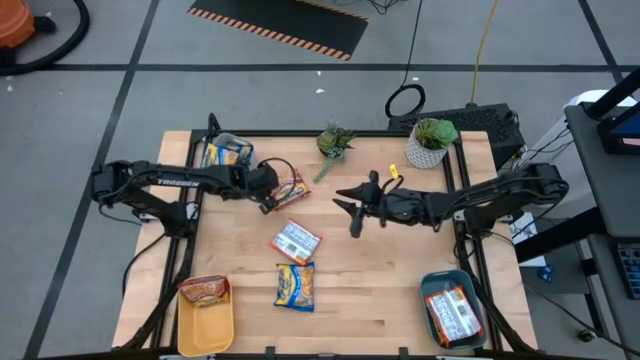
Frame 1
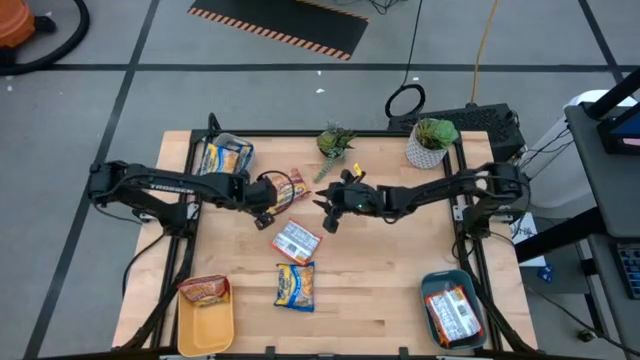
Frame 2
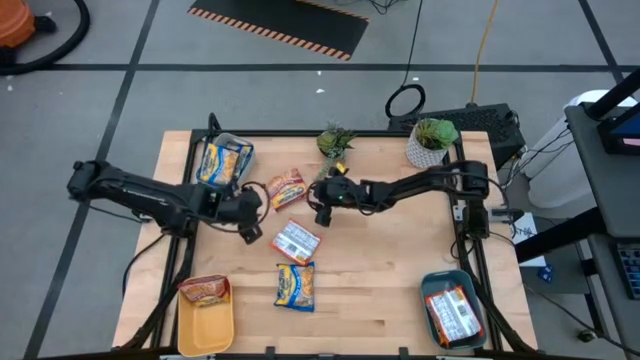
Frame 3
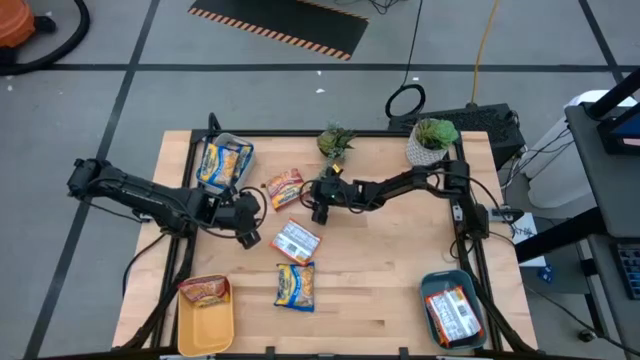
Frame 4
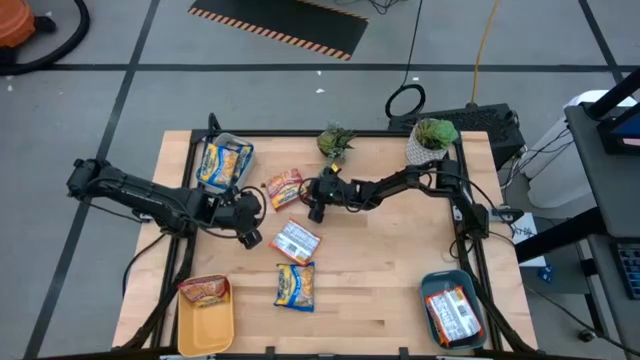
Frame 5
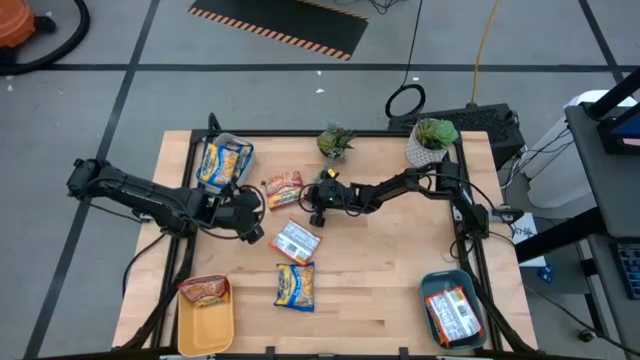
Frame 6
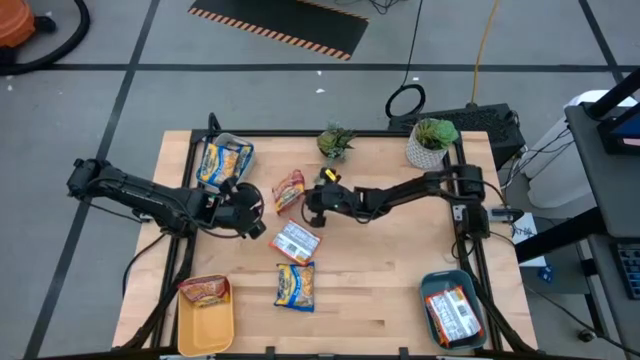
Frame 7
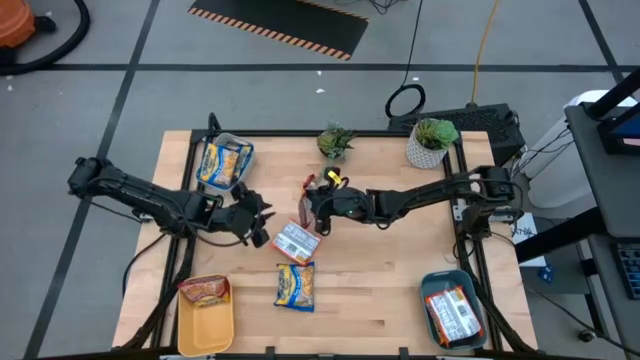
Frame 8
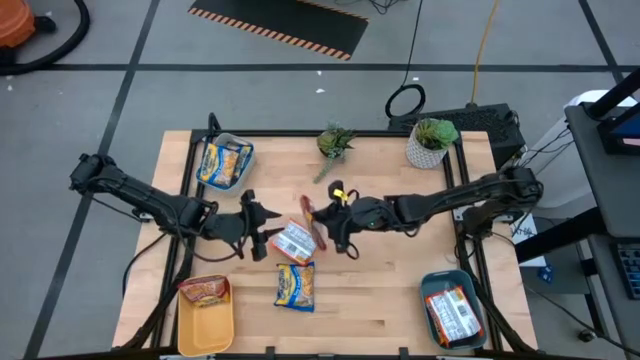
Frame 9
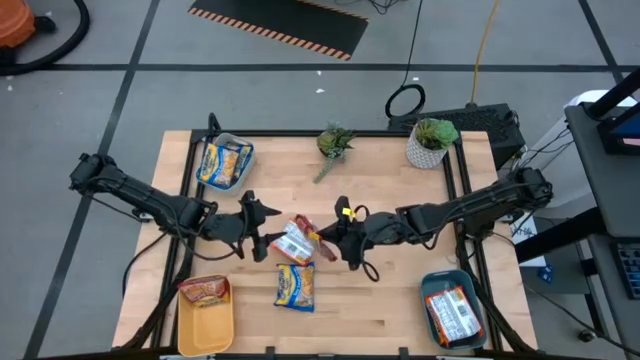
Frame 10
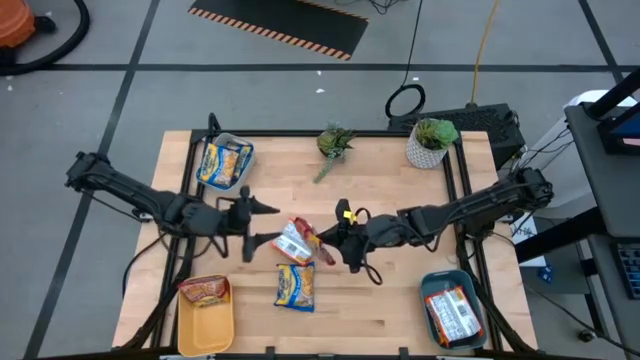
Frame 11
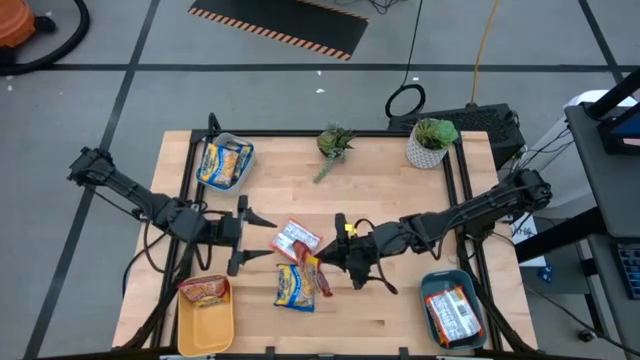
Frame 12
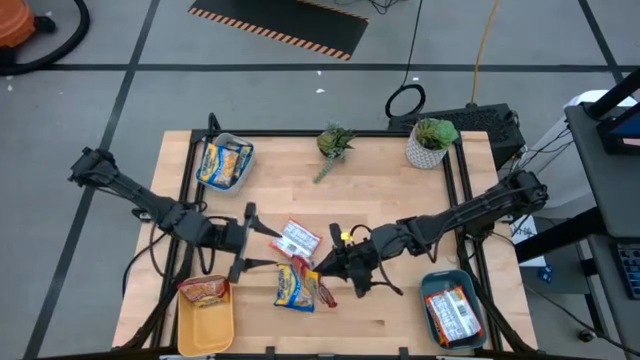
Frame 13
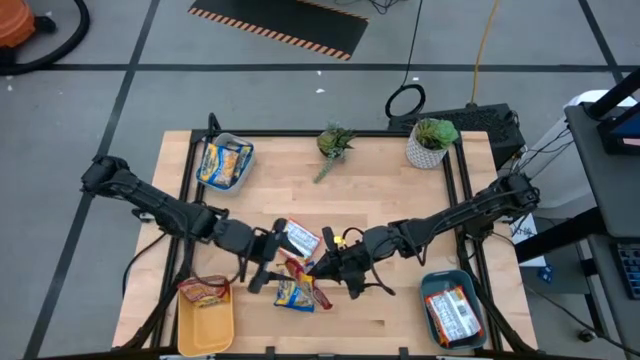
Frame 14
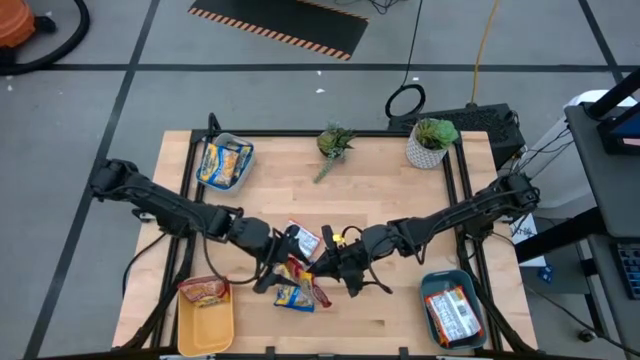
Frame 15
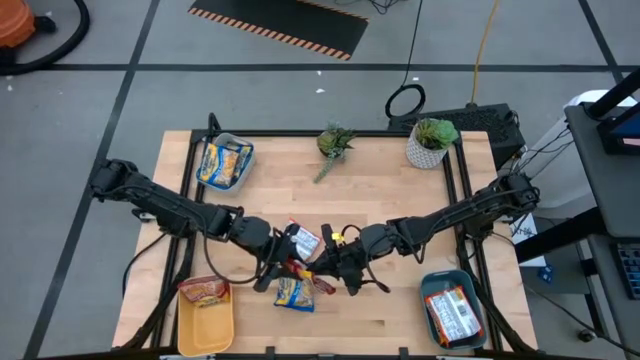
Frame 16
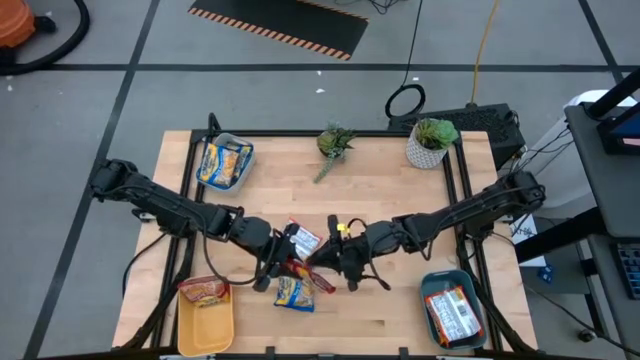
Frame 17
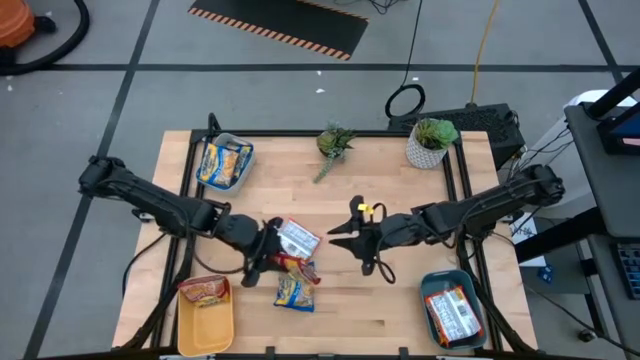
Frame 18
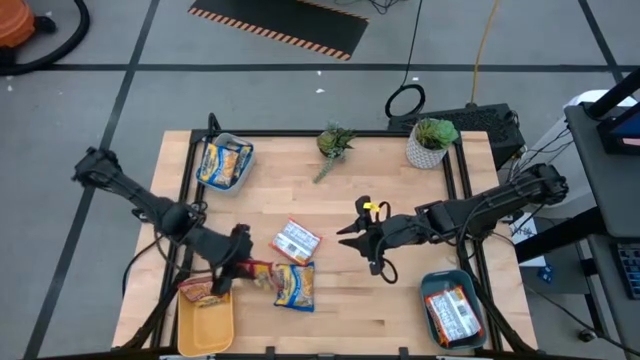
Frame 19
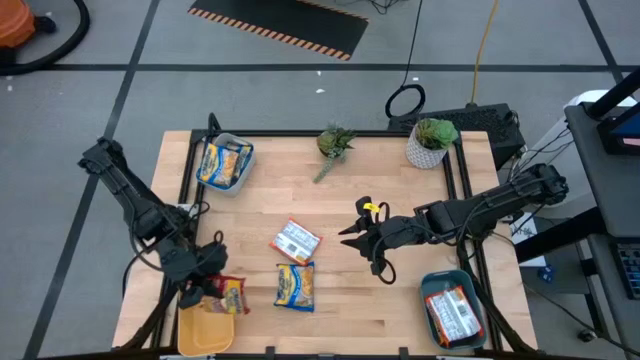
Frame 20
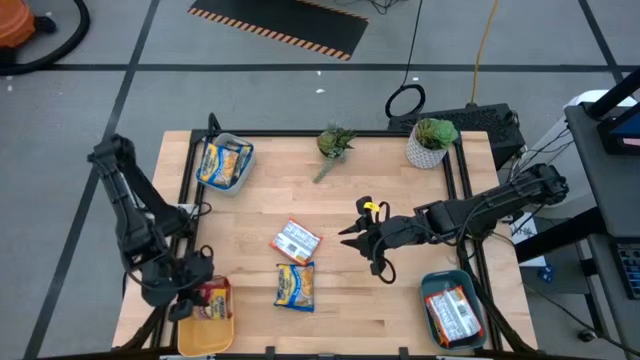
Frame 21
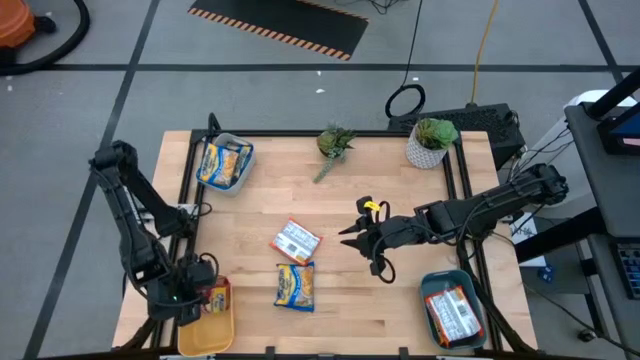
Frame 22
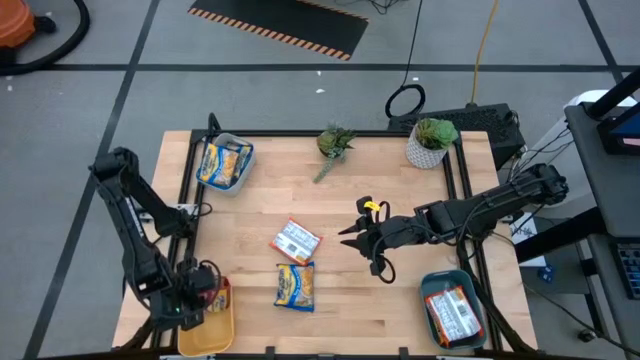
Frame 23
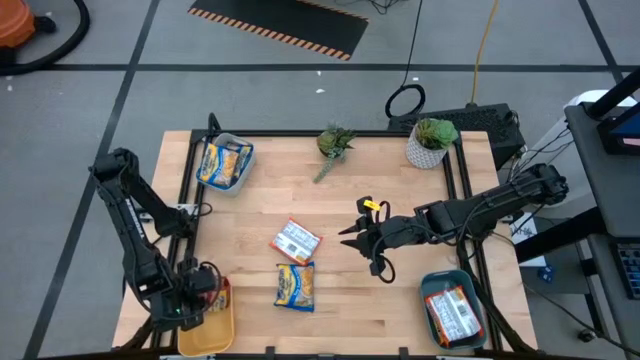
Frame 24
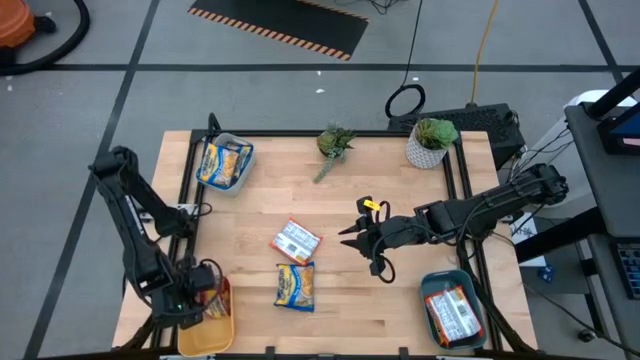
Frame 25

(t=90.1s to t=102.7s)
Task: Sort Maruchan noodles
Put the red noodle pack into the yellow bin

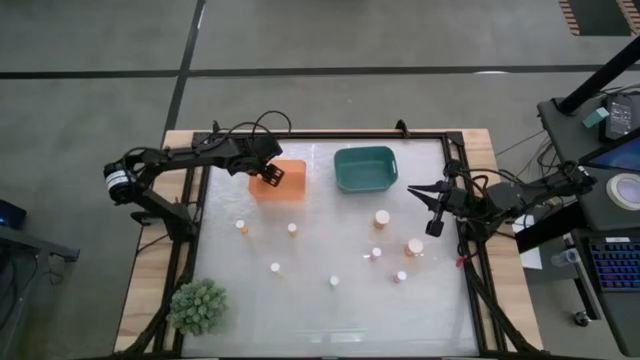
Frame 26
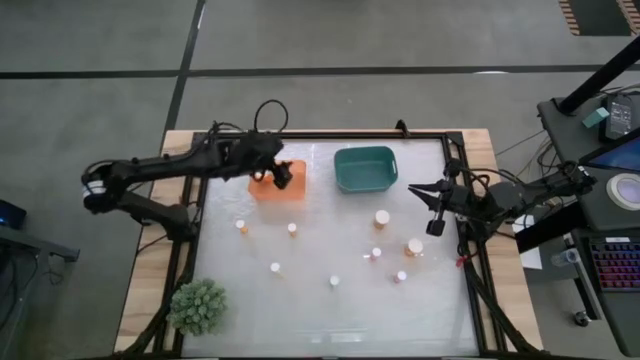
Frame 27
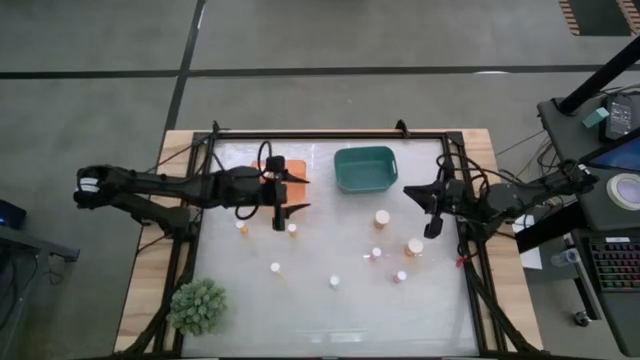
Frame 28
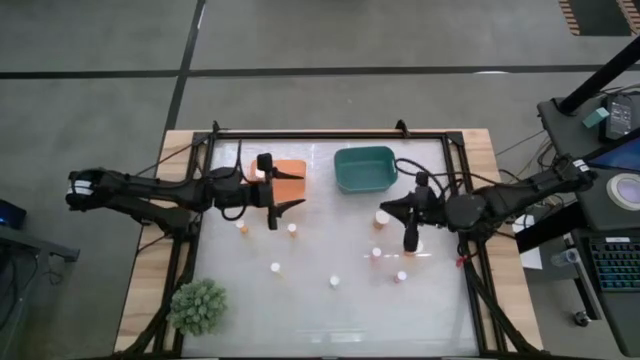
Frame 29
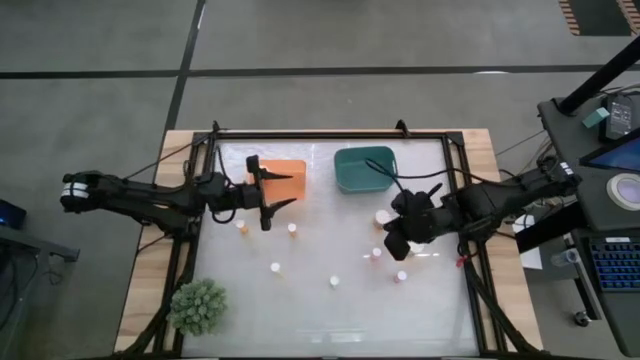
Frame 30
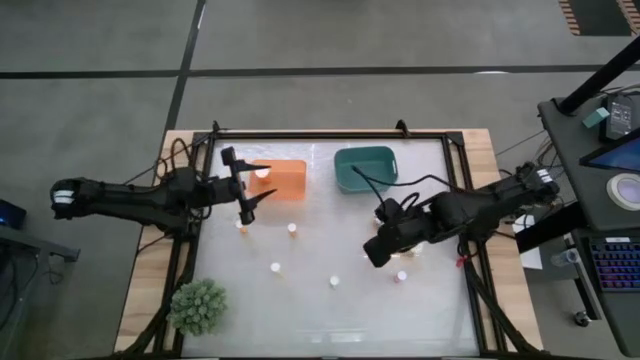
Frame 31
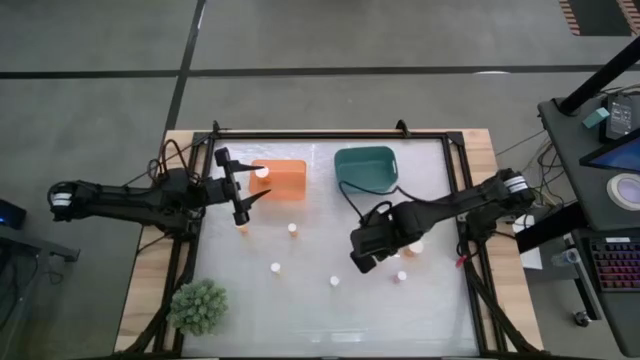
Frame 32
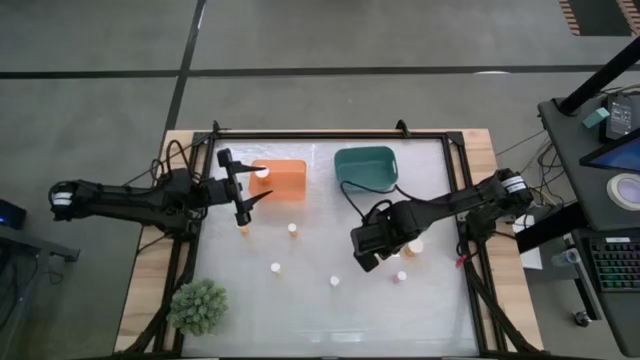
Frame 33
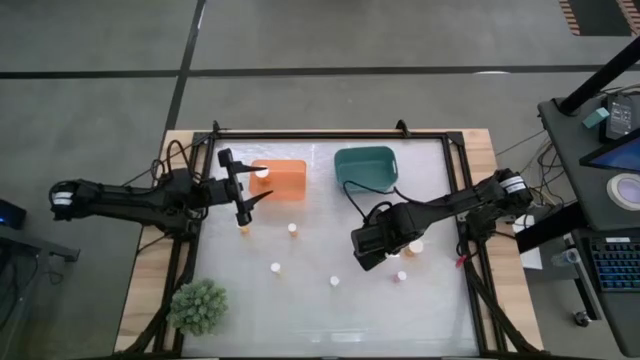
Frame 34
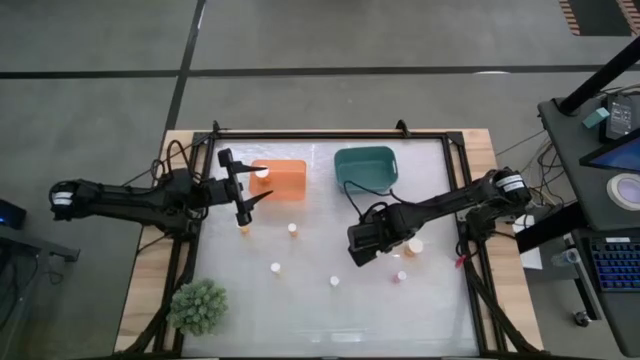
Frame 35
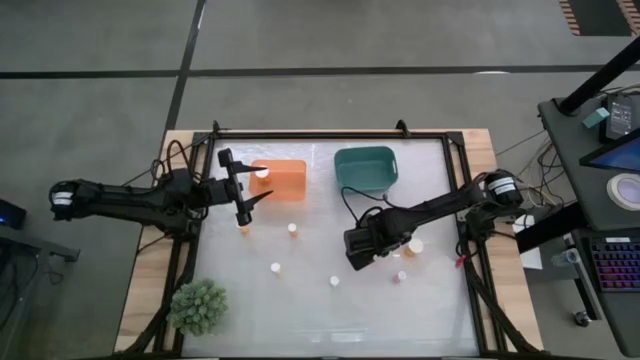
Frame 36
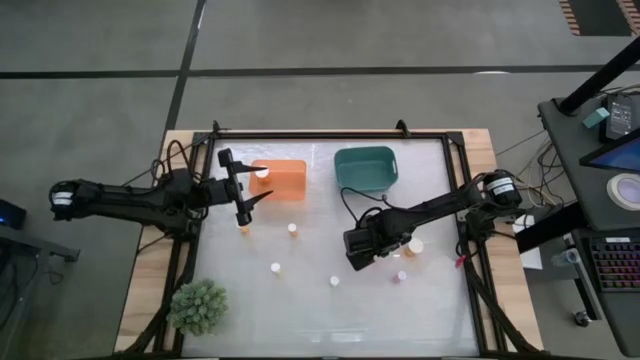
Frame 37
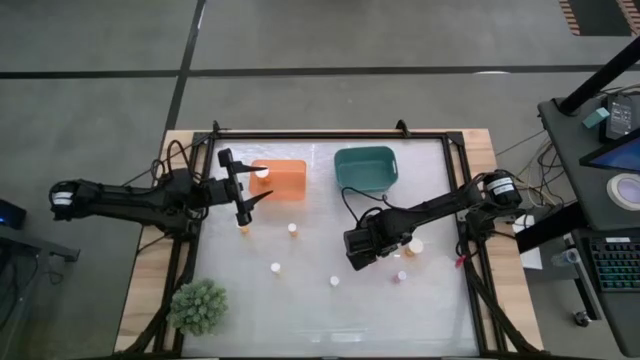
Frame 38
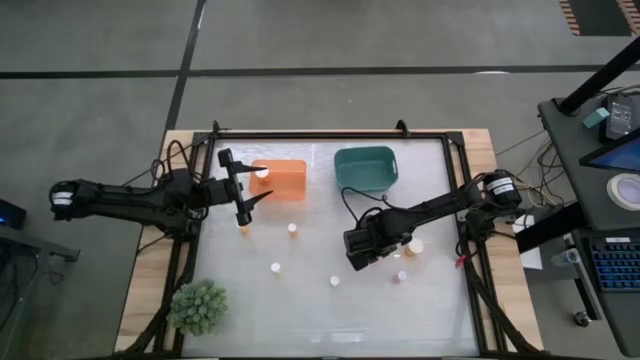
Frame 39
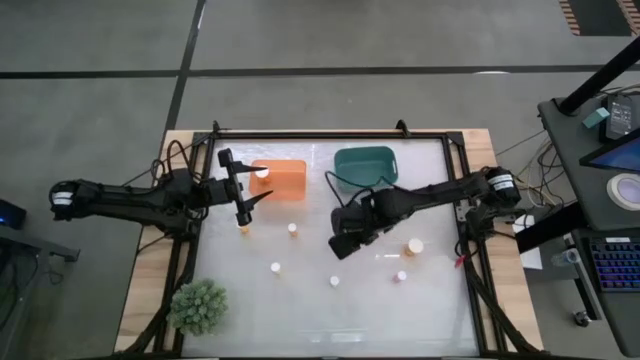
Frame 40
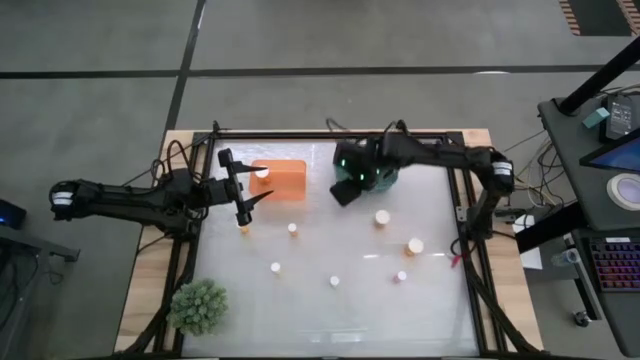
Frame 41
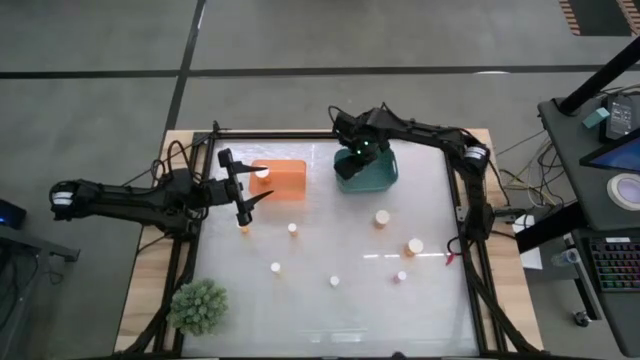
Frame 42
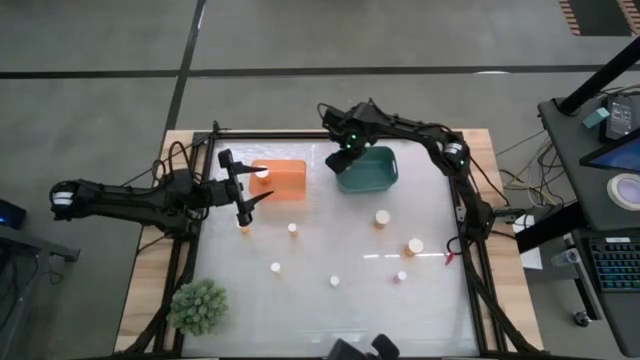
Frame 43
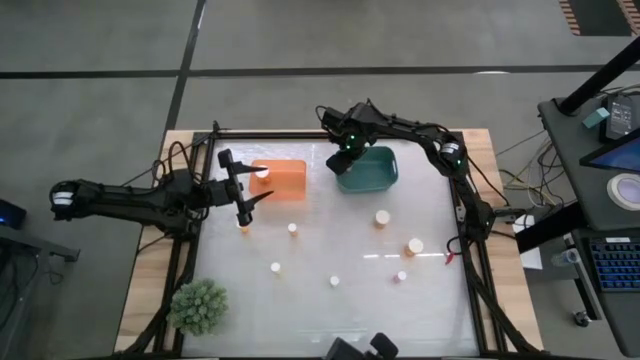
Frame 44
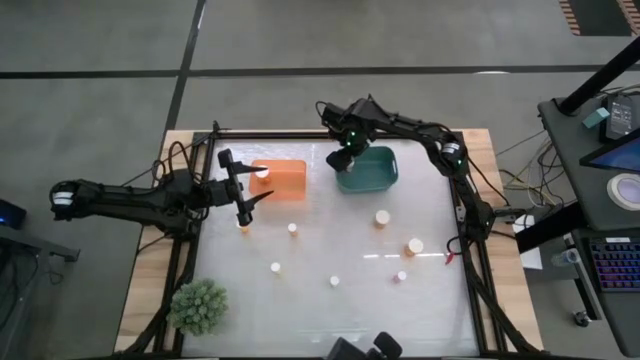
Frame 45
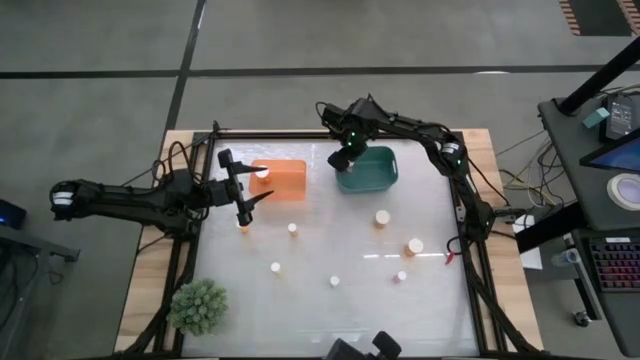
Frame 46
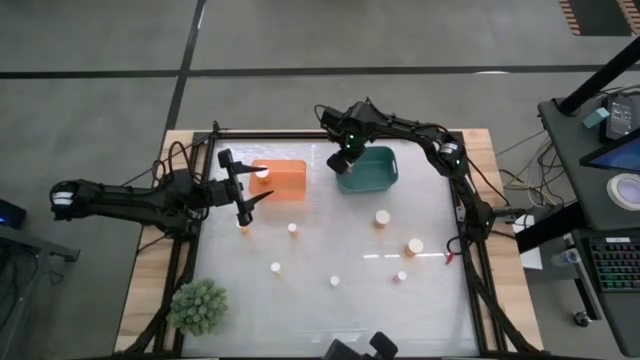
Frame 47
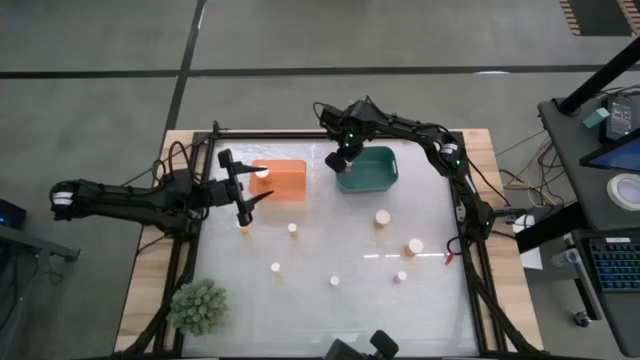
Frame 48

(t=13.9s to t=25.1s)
Task: Pick and place medicine bottles into bin by pill shape (circle, oval)
Put the top pink pill bottle into the green bin
